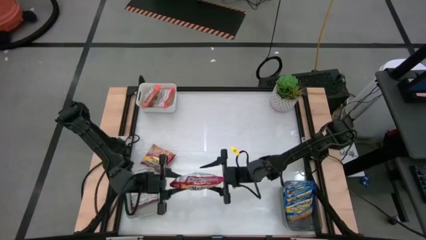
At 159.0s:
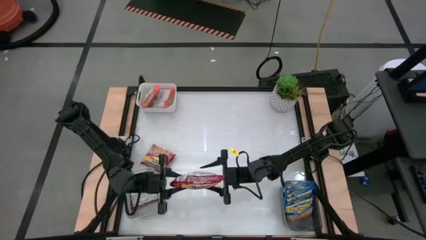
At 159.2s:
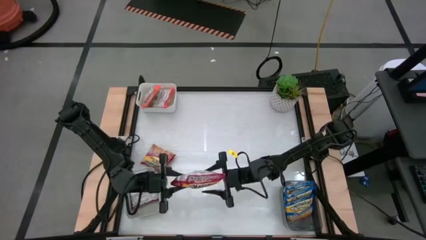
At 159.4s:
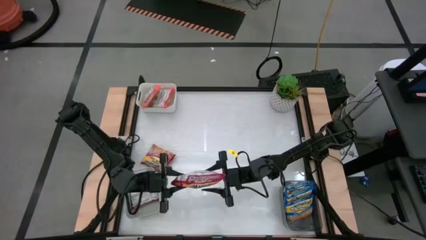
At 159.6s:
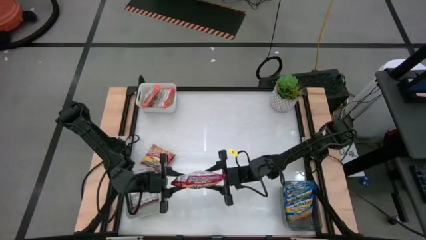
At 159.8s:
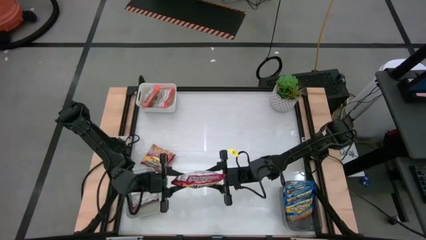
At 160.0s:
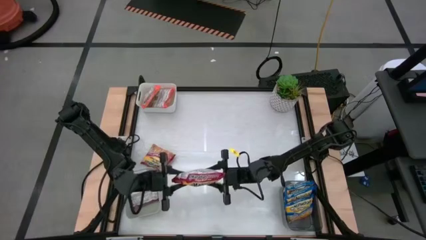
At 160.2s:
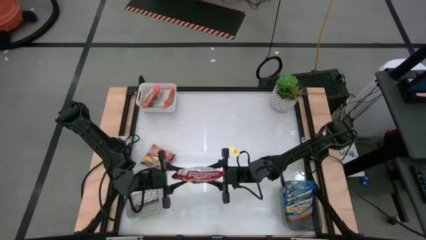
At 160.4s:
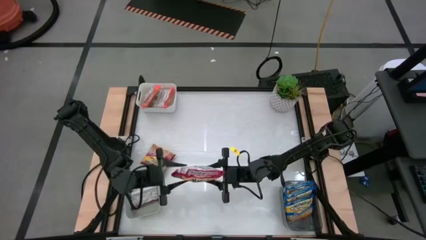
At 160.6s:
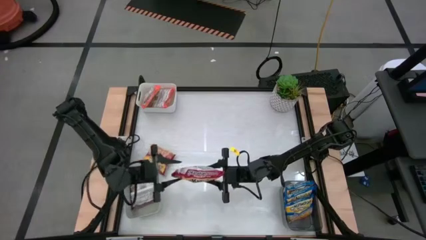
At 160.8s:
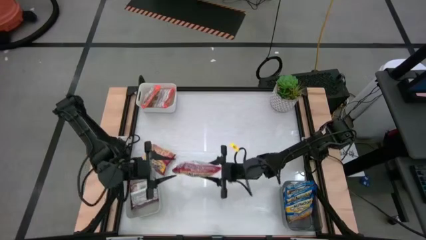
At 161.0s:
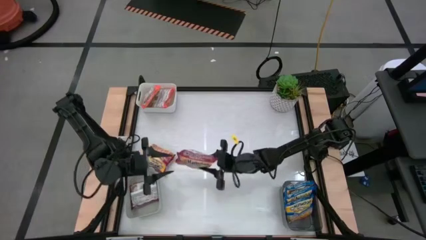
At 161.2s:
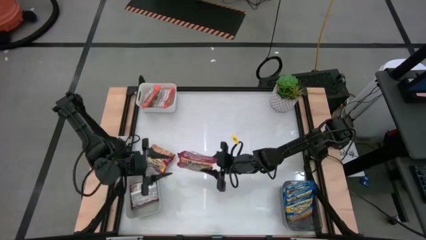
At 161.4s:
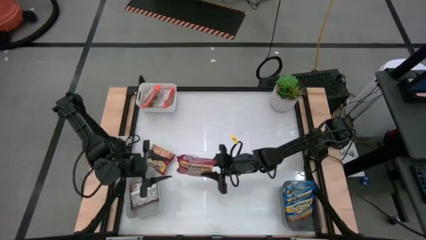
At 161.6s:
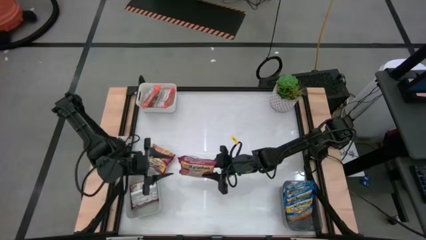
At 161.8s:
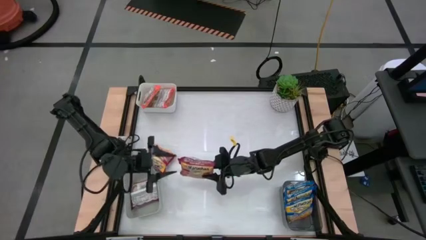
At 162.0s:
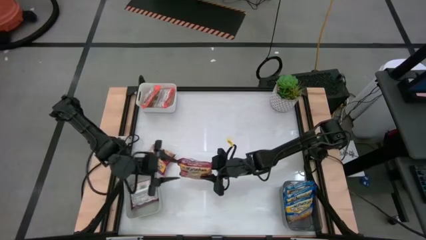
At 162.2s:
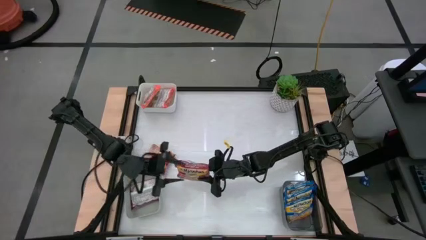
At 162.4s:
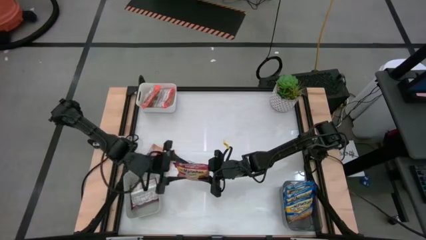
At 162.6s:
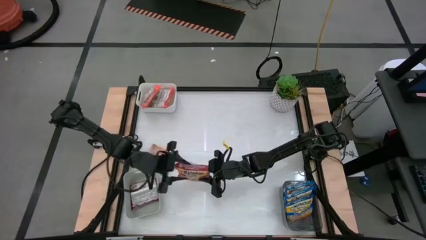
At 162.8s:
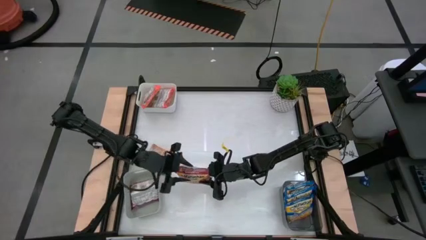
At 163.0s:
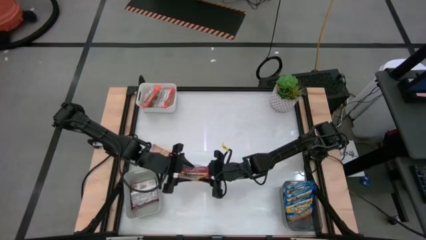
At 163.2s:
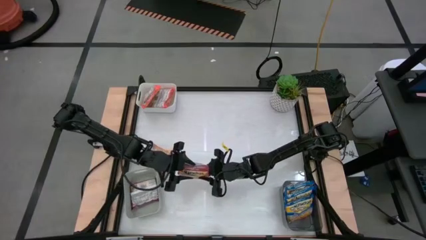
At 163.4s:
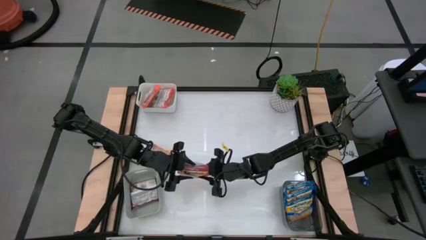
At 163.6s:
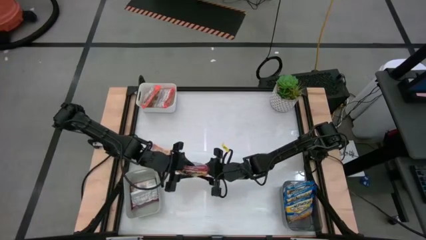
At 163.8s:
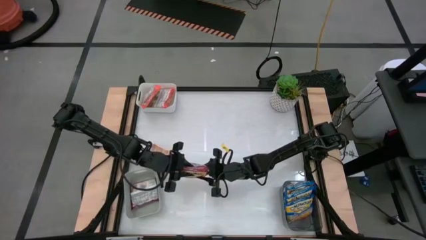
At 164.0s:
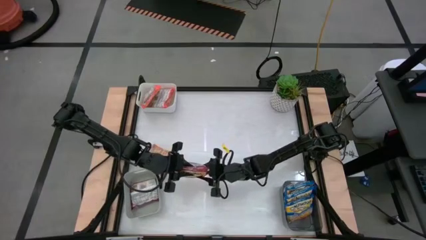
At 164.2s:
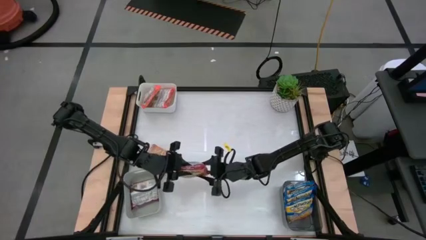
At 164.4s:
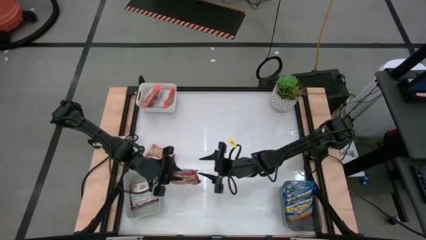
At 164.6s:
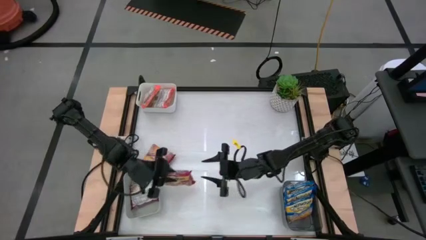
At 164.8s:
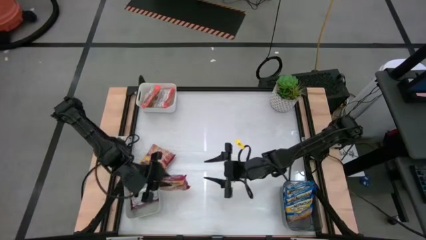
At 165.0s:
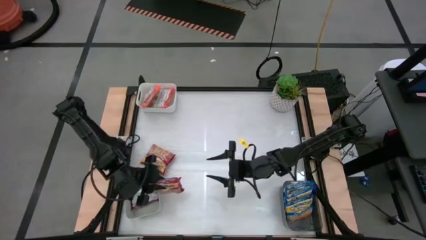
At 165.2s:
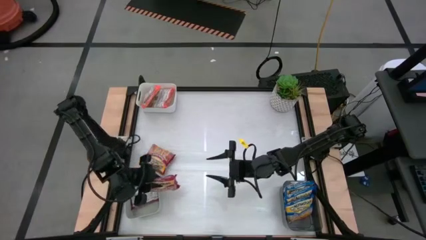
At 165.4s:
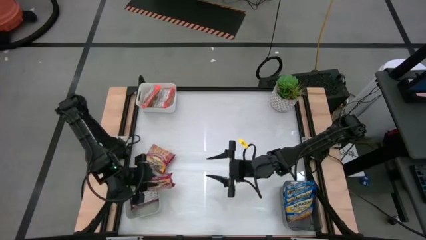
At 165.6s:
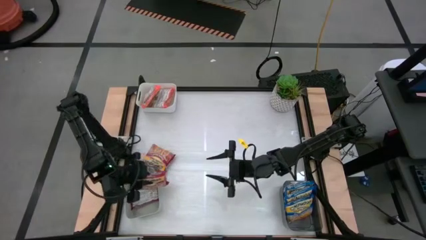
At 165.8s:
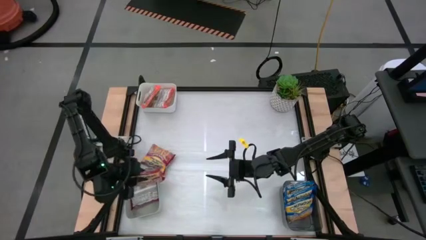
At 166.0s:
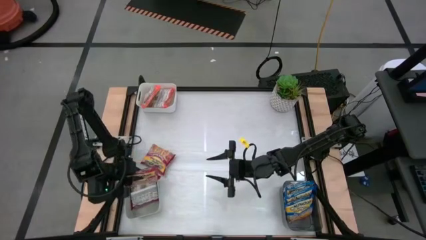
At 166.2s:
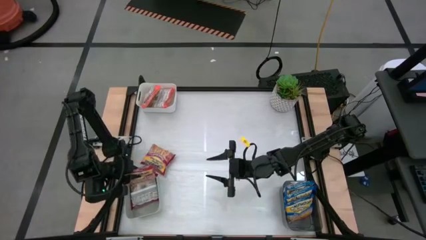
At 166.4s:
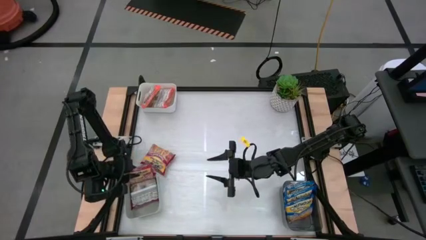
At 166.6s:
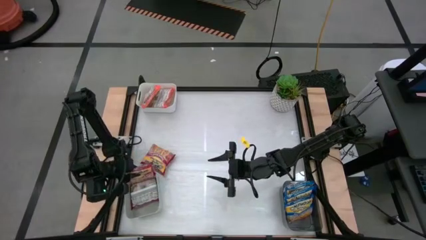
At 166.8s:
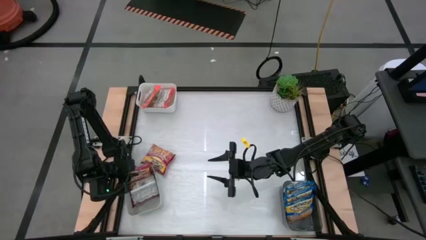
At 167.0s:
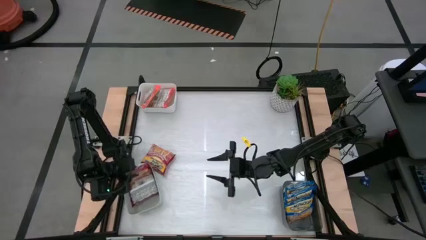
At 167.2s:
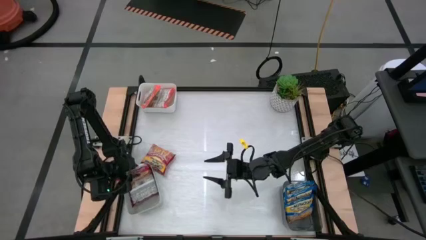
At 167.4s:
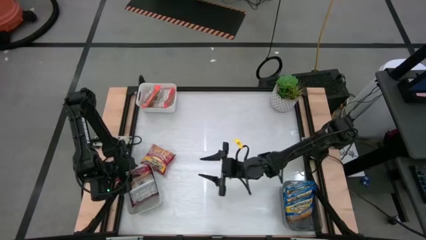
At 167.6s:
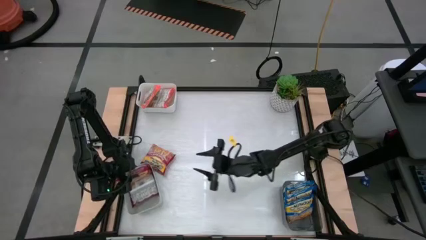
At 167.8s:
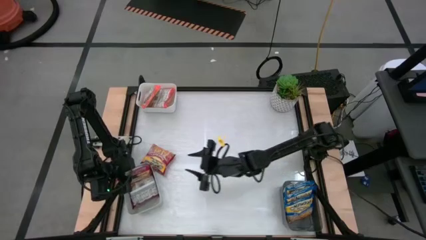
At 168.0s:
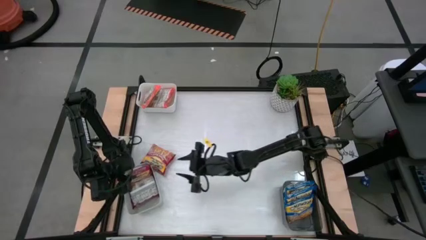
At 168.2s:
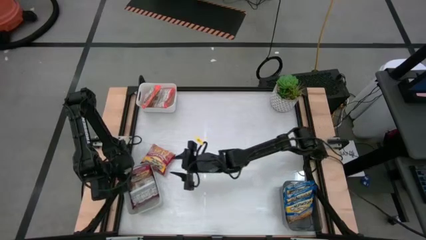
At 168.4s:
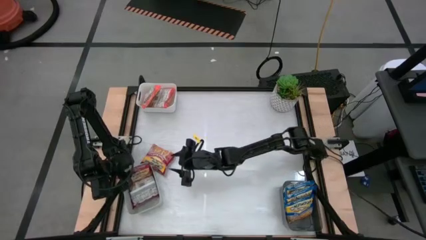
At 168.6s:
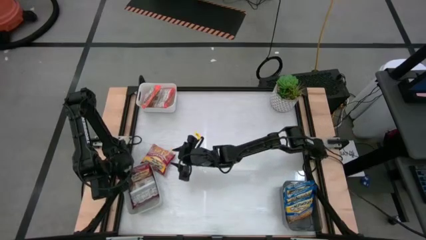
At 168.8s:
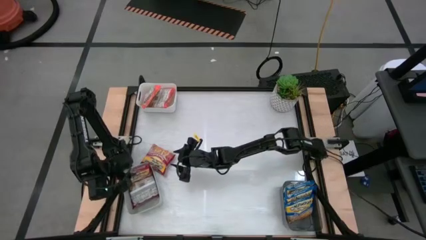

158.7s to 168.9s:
Task: Sort Maruchan noodles
Put the bottom red noodle pack into the gray bin

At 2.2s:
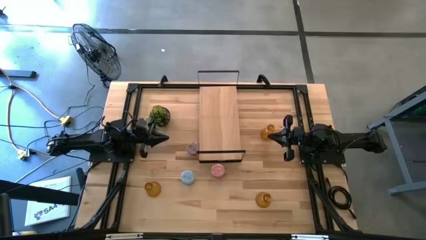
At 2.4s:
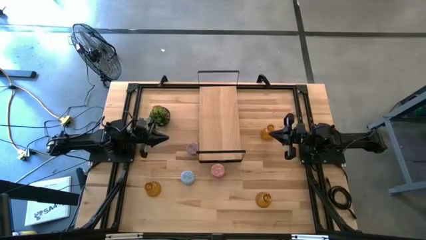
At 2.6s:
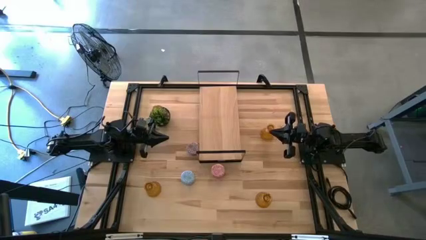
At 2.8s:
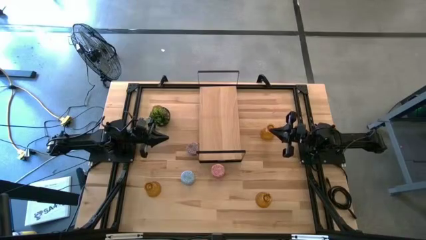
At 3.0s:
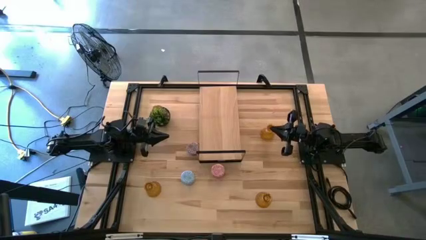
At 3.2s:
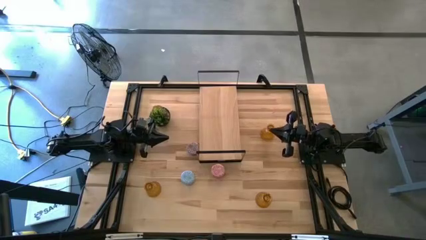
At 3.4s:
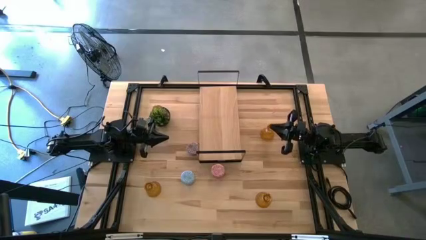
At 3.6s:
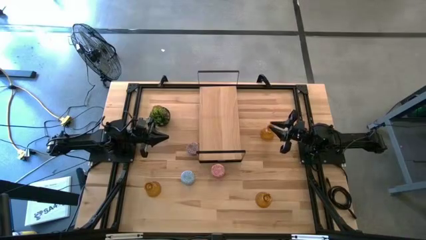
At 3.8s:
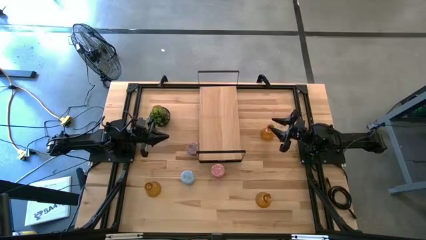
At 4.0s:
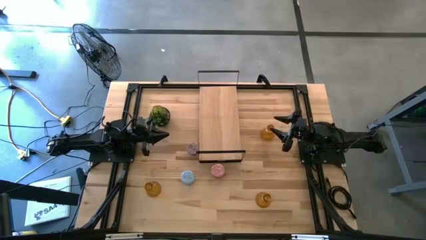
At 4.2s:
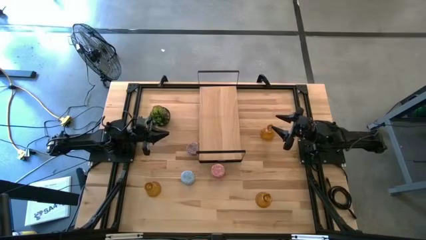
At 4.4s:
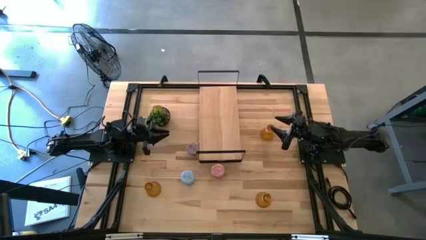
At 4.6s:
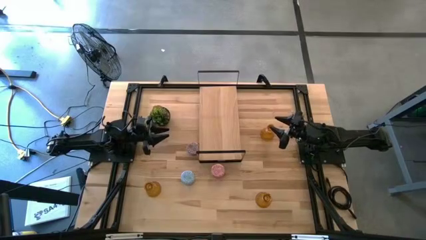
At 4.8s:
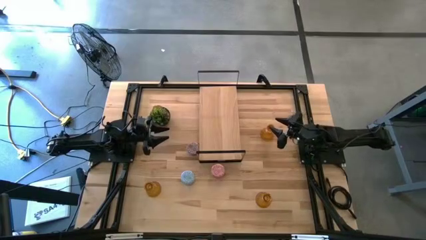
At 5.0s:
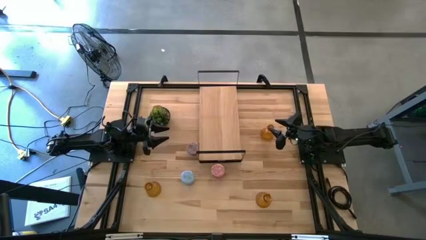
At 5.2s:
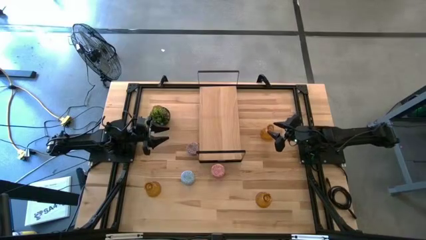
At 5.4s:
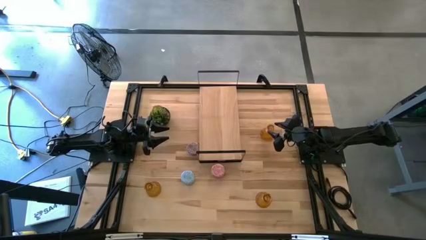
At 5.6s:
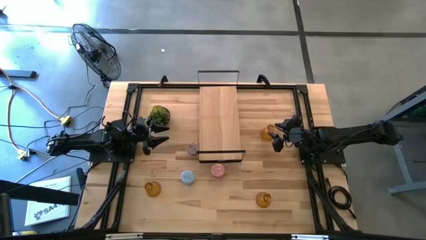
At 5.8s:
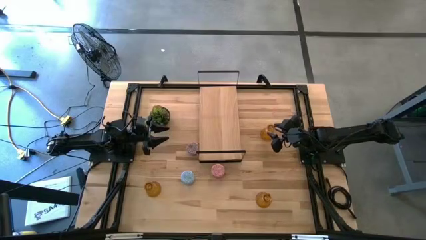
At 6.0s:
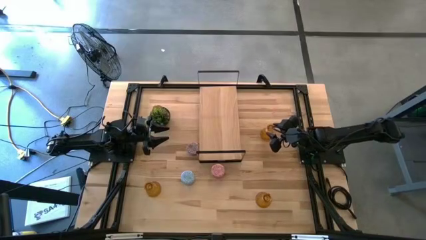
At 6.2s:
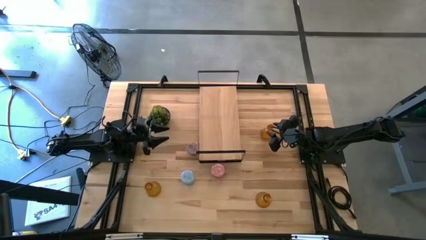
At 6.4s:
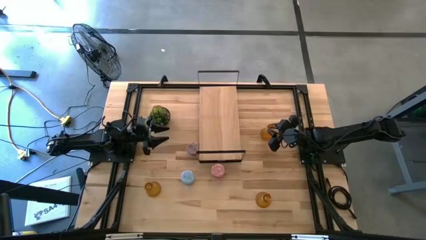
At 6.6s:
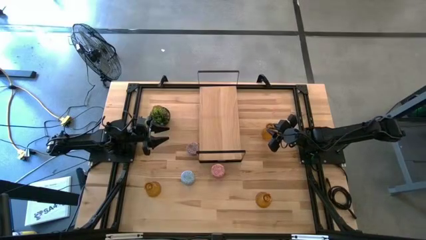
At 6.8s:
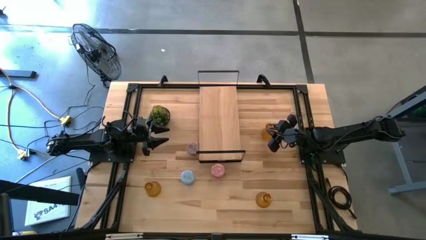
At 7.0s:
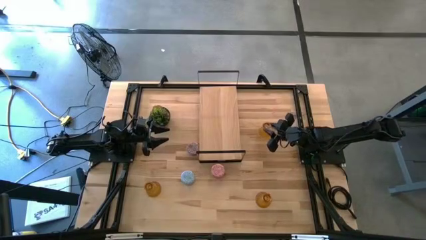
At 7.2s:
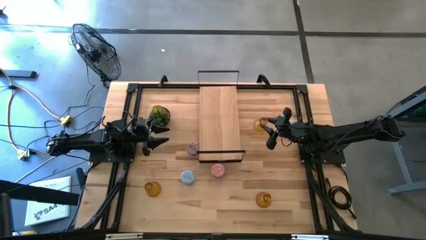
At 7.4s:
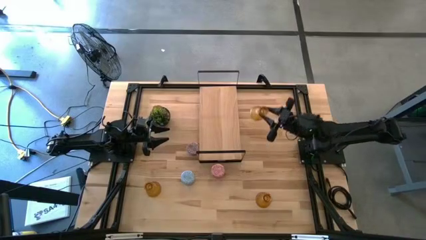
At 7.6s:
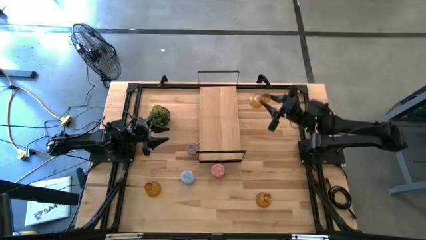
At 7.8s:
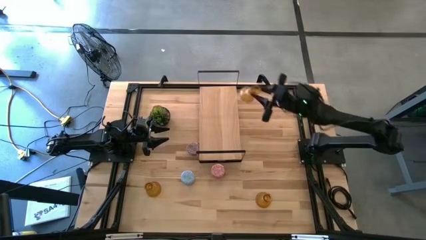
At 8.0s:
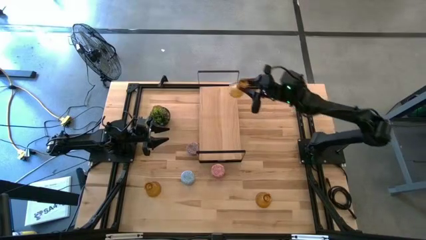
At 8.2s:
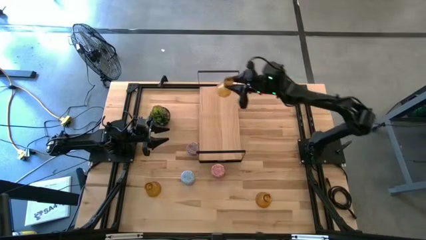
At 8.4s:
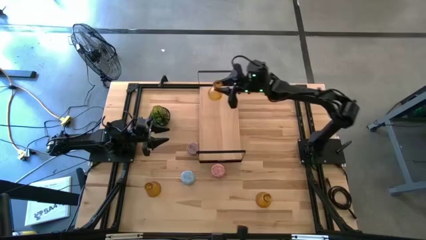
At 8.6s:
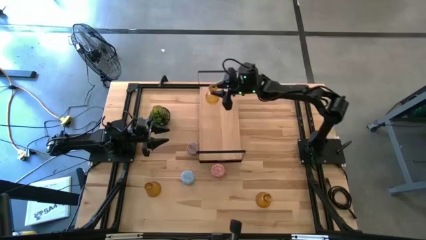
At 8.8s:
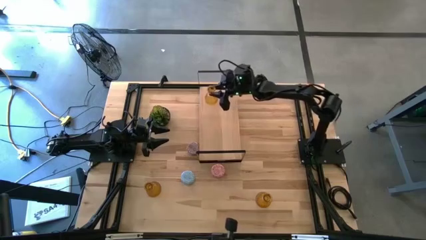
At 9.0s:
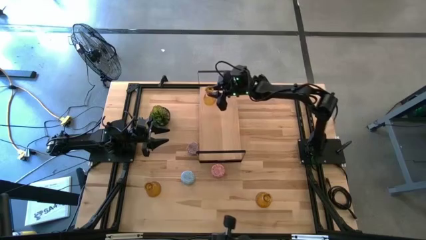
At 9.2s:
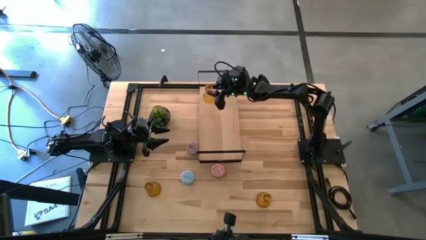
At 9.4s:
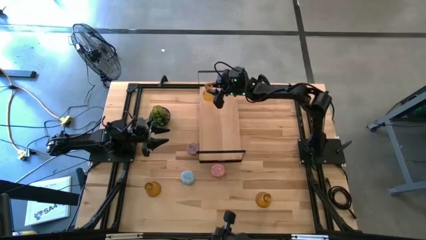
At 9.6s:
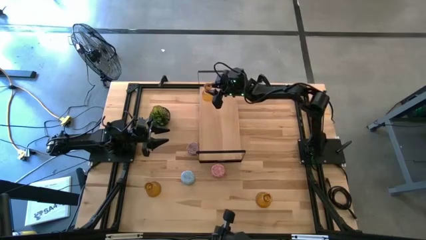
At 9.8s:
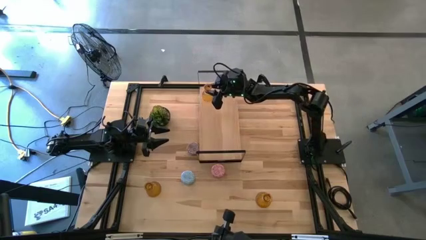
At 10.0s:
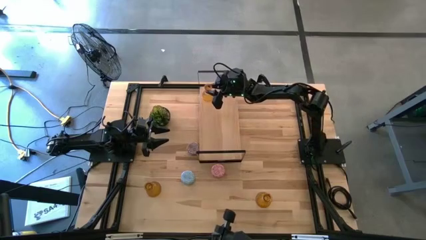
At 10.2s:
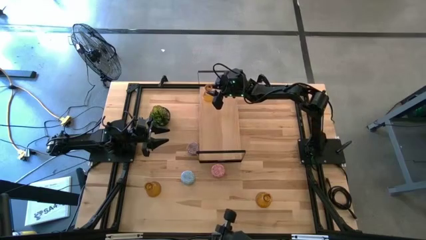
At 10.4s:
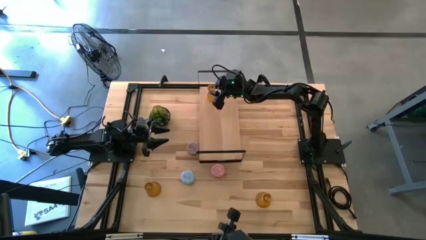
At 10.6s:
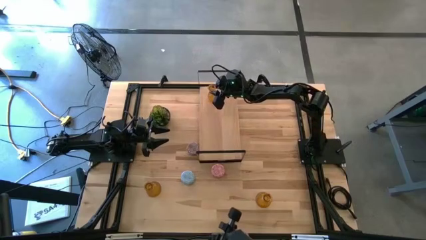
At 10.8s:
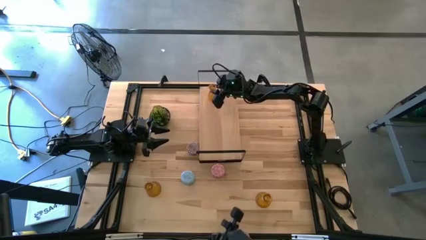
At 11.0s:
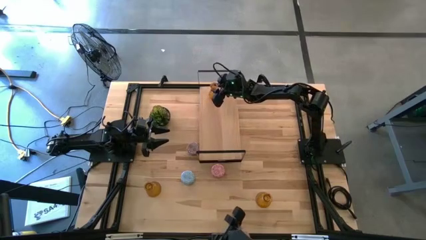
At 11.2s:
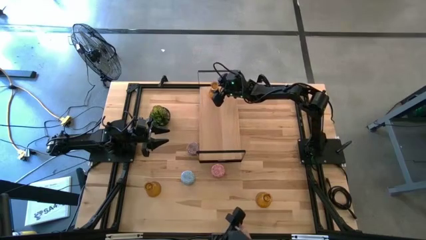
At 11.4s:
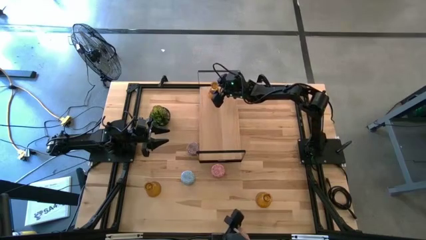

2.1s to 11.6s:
Task: Pick & Place candle stick holders
Put the top orange glass candle holder on the shelf
